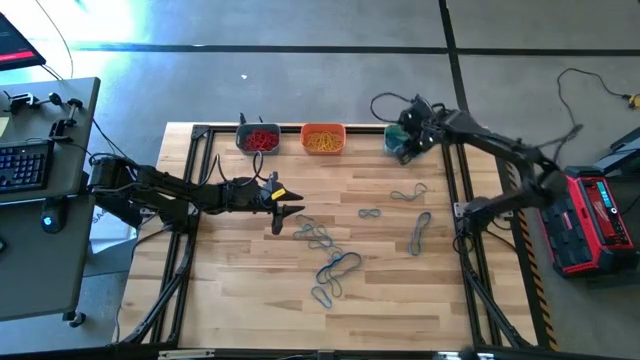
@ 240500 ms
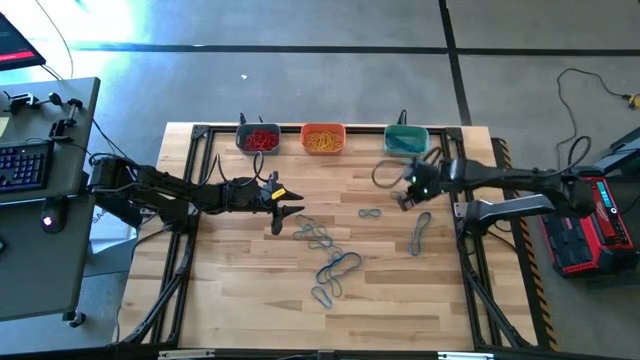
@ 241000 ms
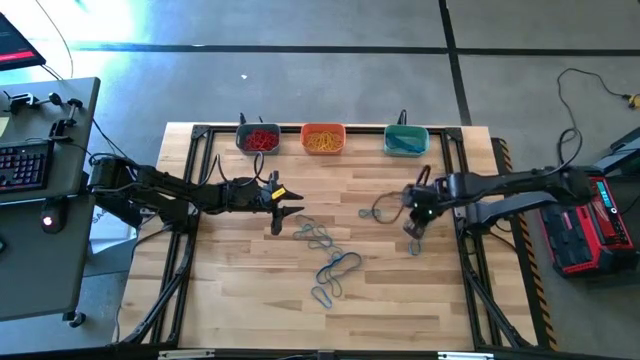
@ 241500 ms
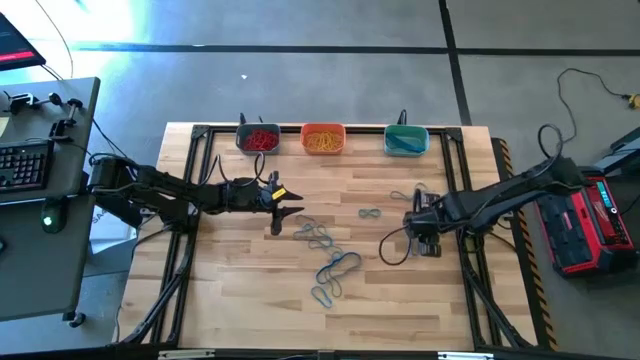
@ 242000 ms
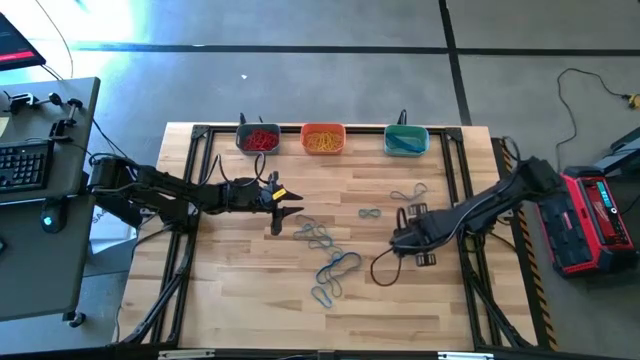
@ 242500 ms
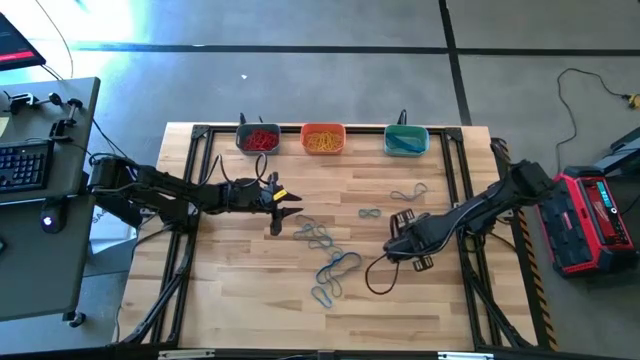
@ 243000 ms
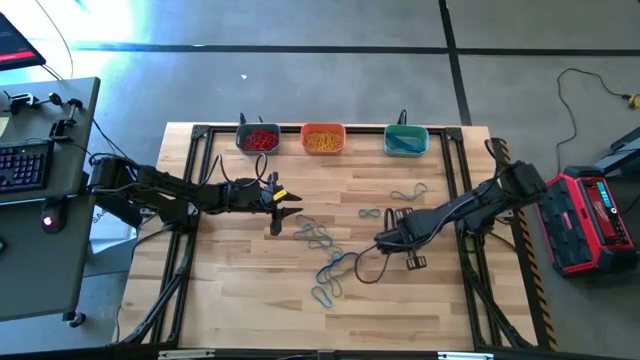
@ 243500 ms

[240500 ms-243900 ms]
Task: Sort rubber bands into baskets
Put the blue rubber band into the light blue bin

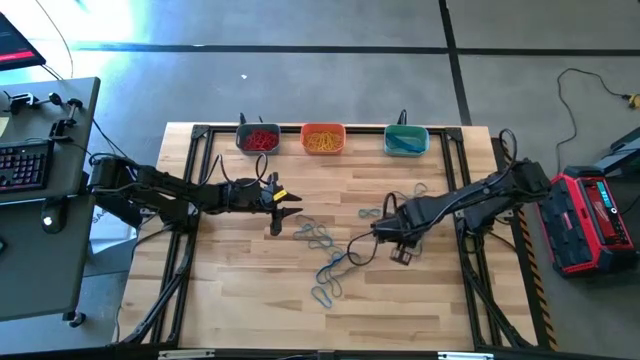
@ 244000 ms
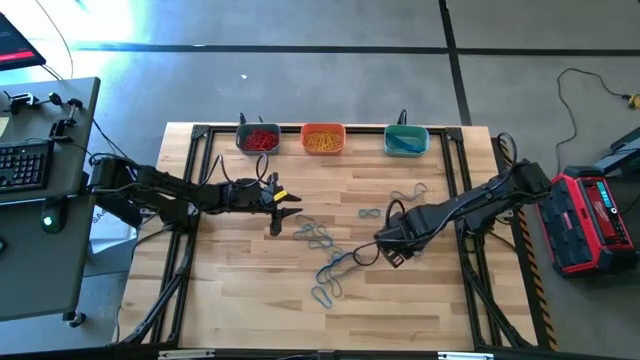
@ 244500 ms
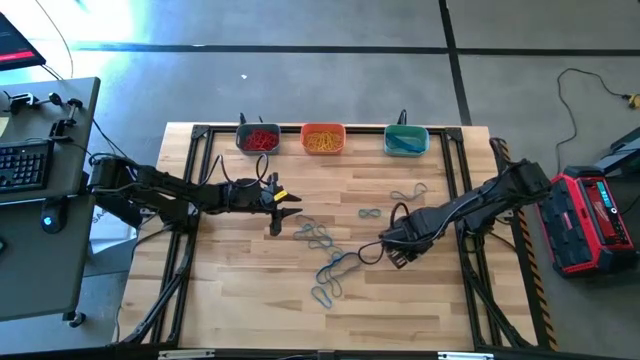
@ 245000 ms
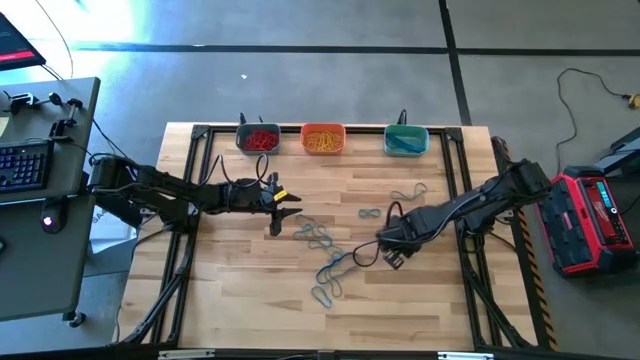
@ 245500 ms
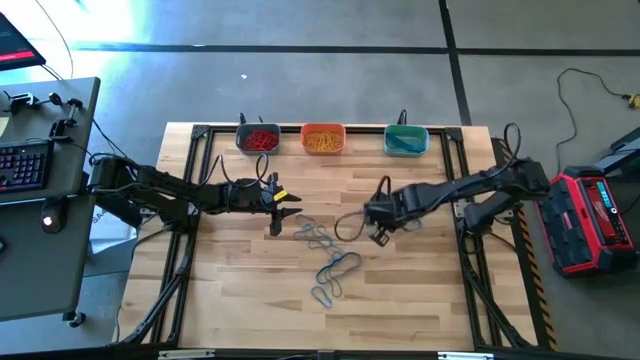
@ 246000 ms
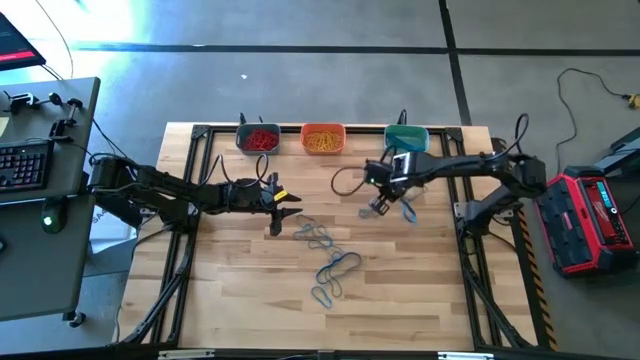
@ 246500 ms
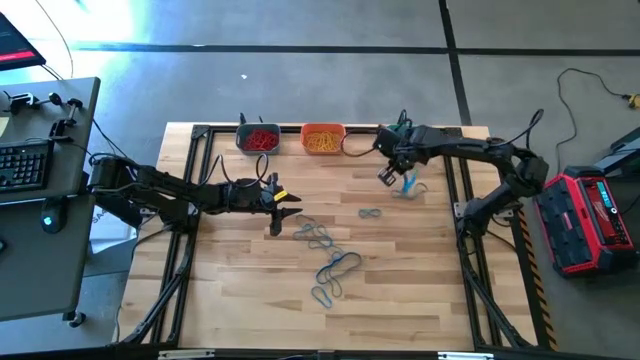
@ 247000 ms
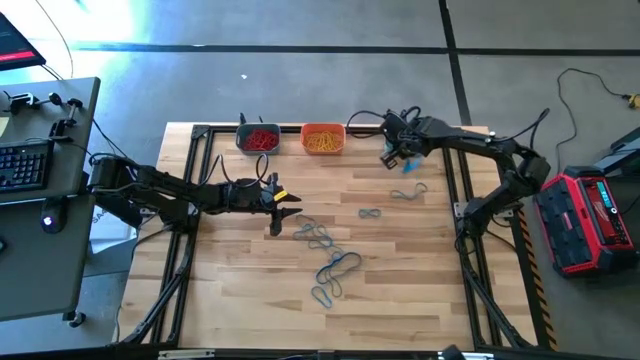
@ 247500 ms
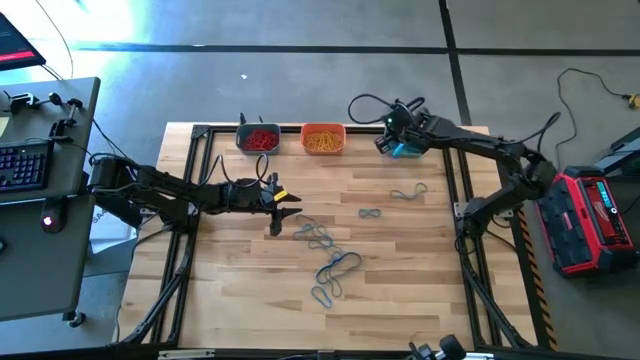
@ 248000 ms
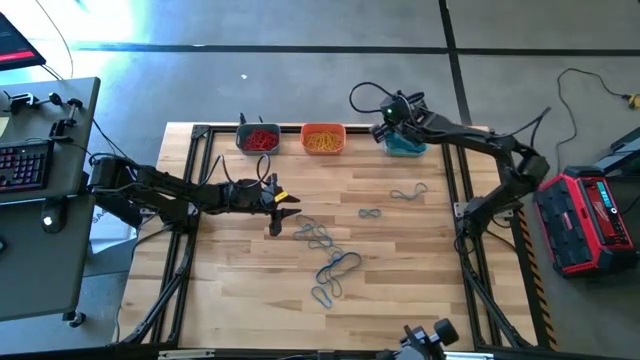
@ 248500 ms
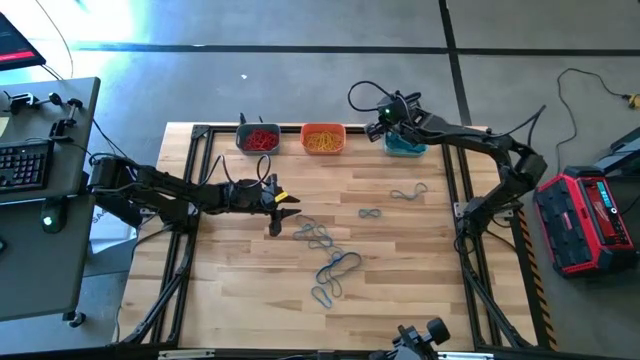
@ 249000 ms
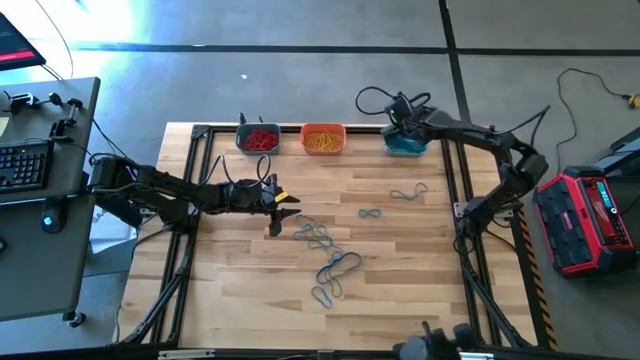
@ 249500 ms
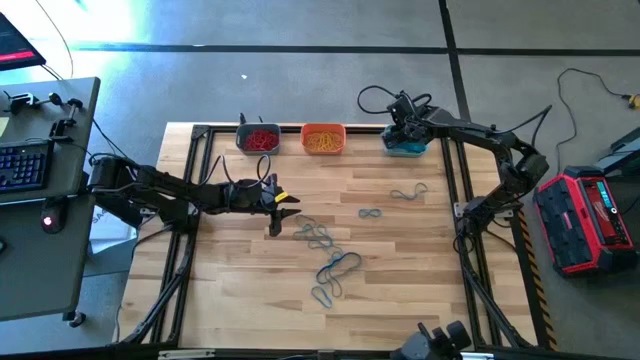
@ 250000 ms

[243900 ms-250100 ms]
Put the blue rubber band into the light blue bin

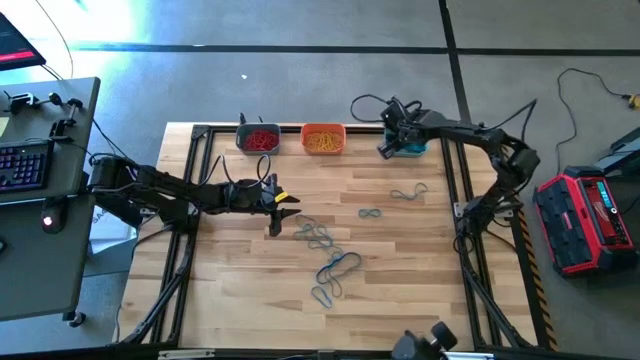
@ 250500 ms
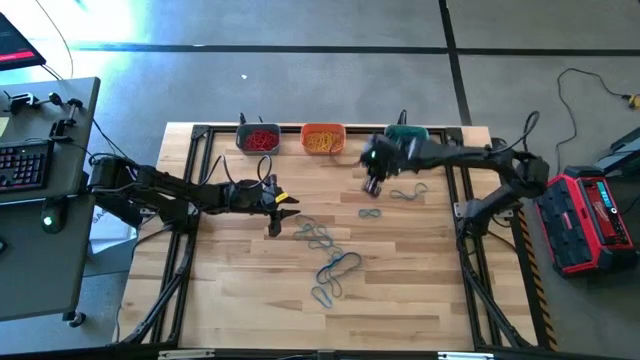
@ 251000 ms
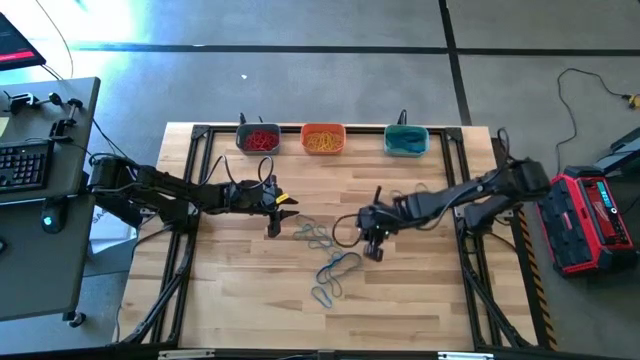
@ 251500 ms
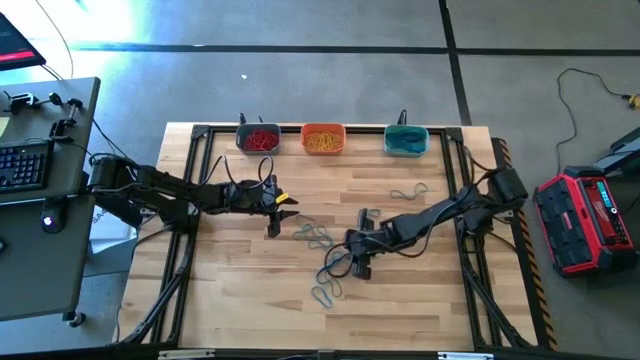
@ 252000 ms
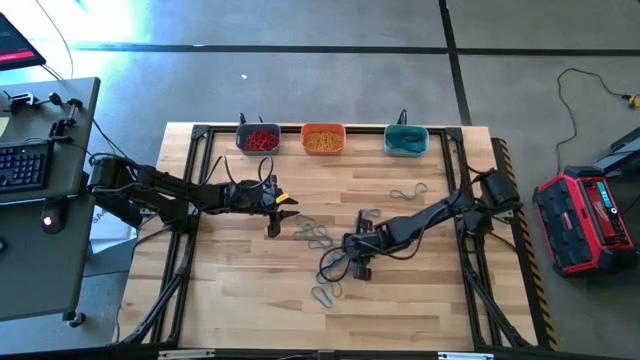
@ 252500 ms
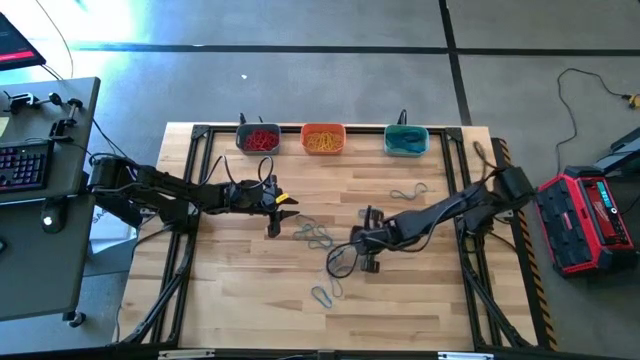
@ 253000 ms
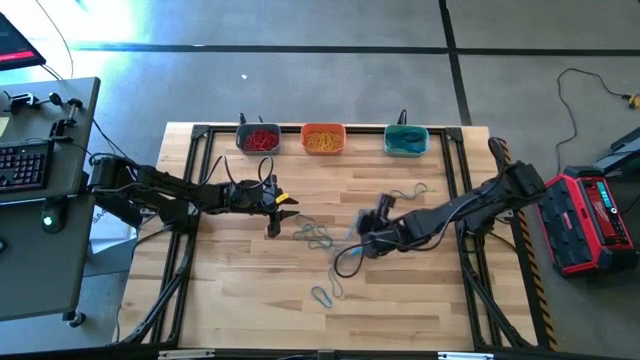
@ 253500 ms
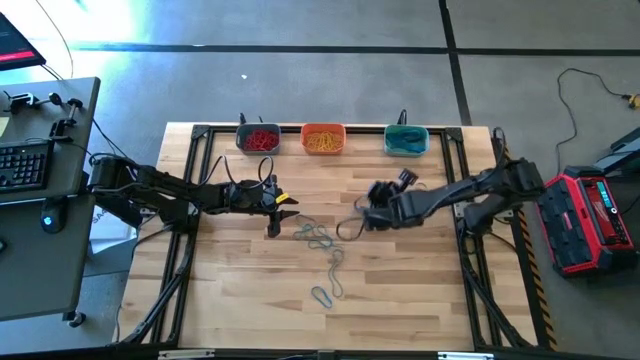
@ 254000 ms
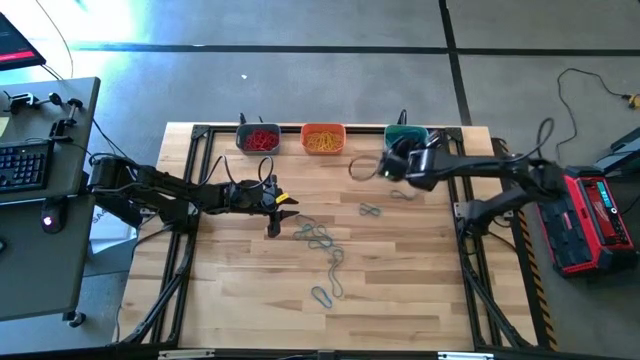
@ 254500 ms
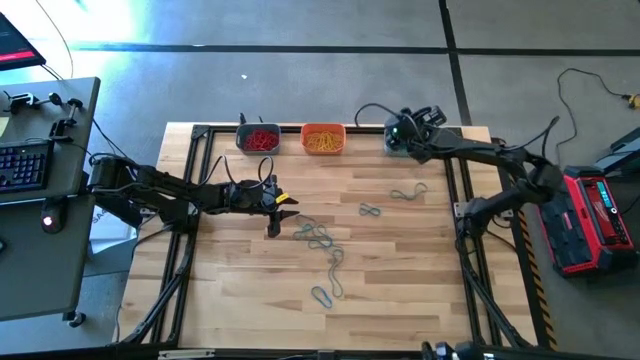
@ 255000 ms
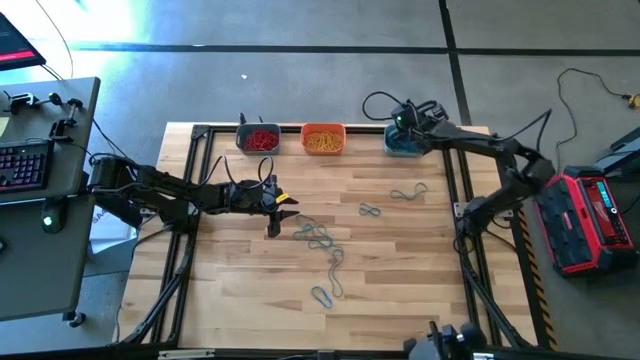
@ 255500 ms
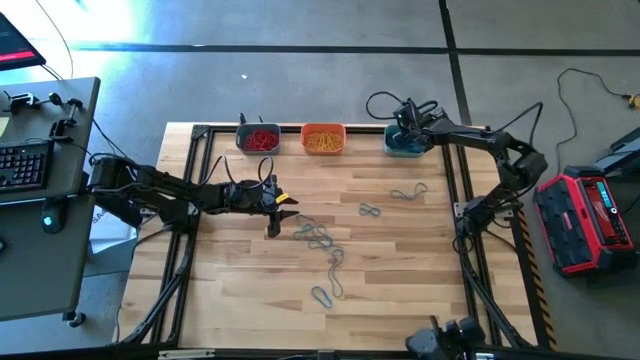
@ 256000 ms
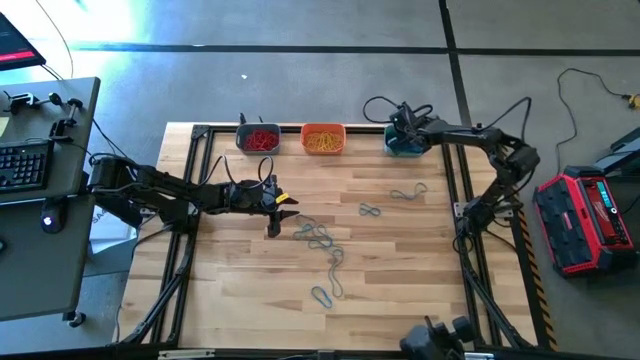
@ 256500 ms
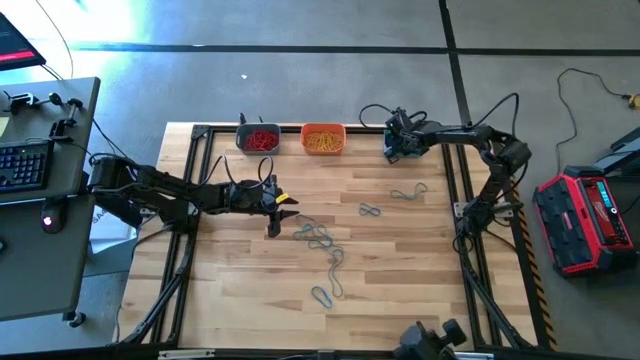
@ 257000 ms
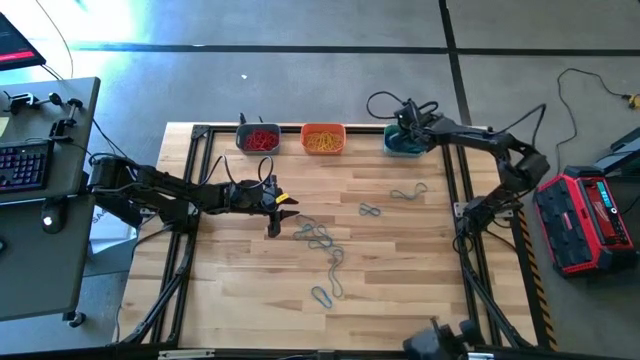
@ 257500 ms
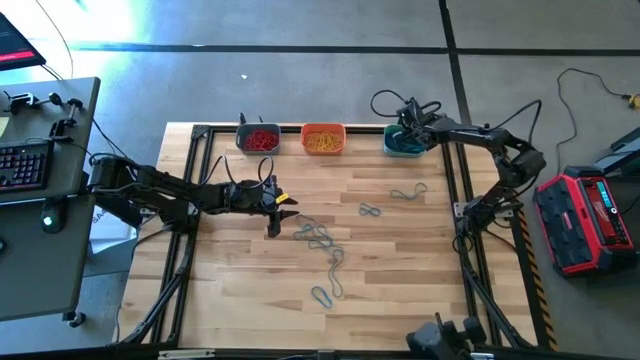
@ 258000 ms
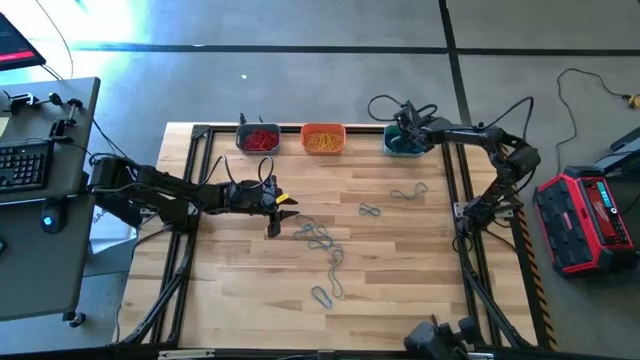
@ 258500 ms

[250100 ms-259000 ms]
Put the blue rubber band into the light blue bin

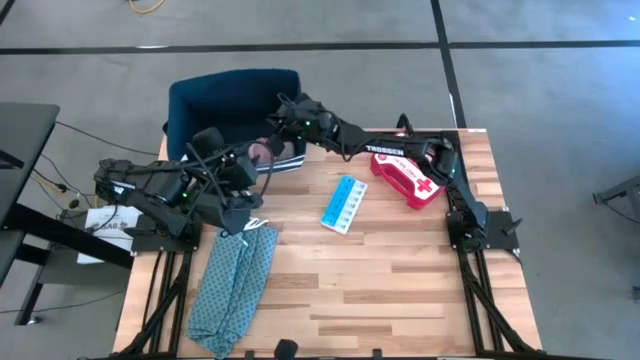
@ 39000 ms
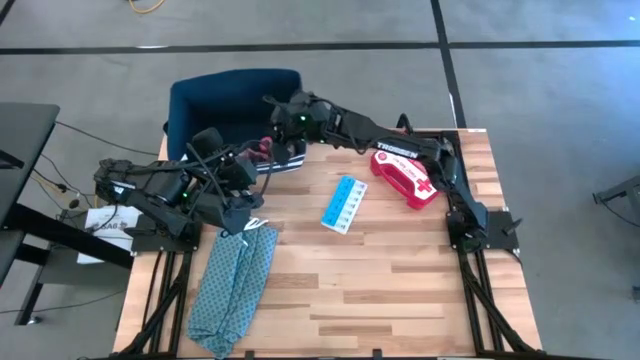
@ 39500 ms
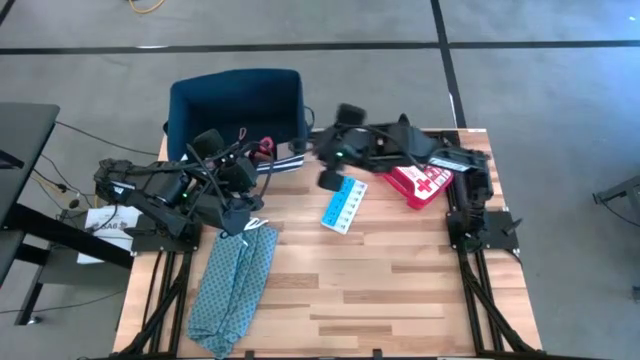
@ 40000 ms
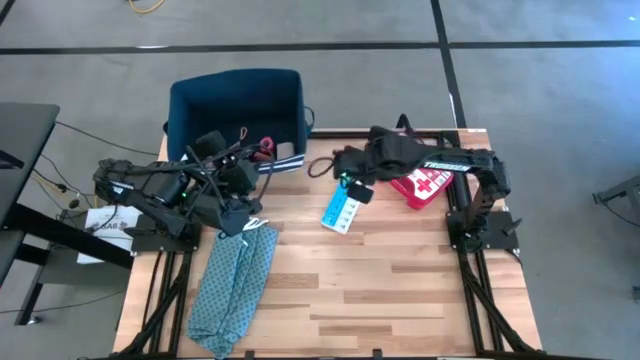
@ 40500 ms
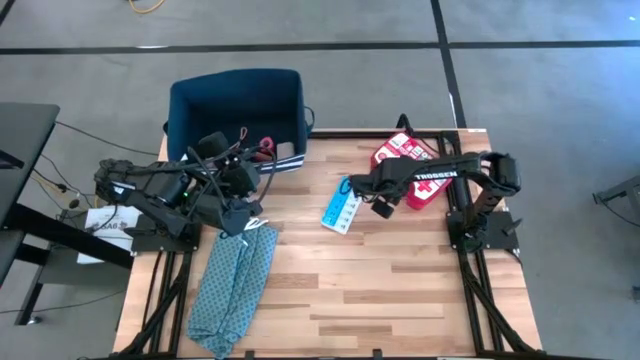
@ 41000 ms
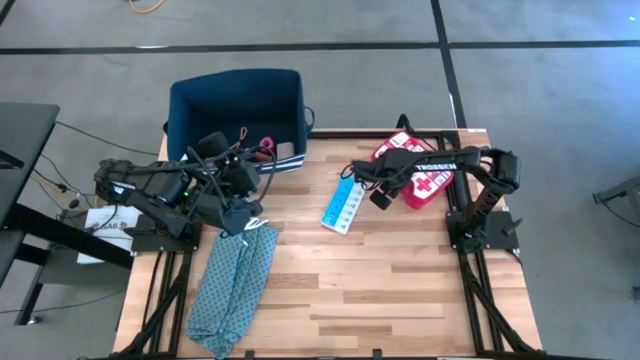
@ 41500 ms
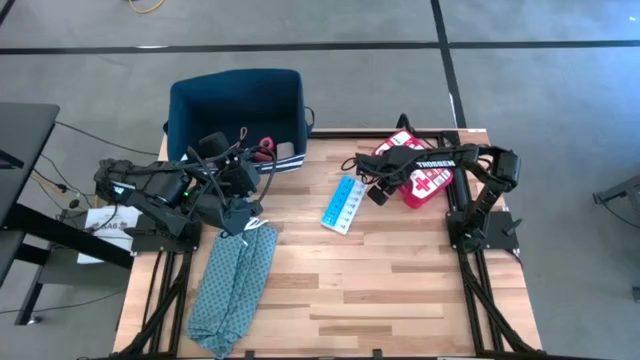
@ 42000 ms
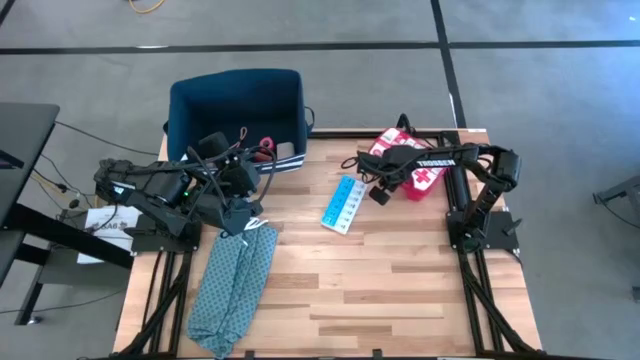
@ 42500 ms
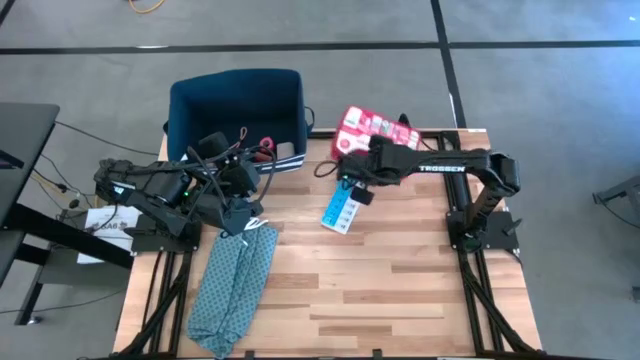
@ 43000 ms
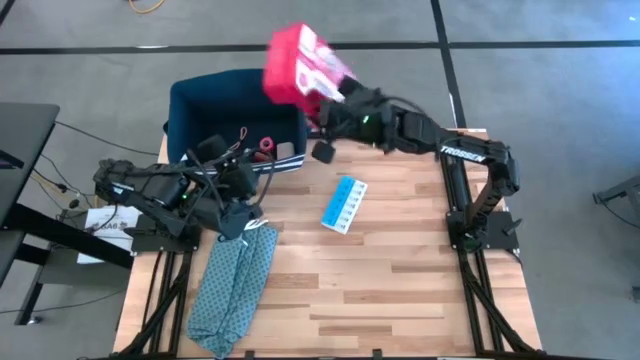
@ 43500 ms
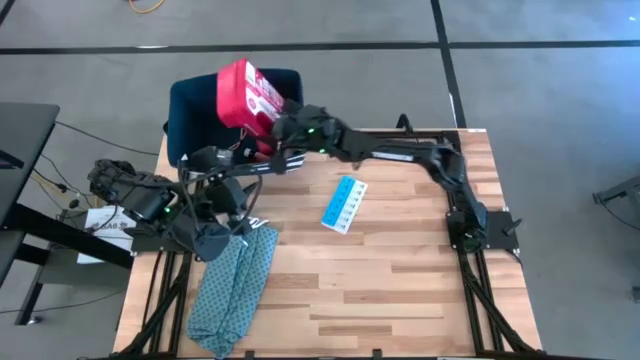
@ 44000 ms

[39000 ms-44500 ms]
Task: Pick & place medical supplies in basket/bin
Put the red first aid kit into the blue bin
